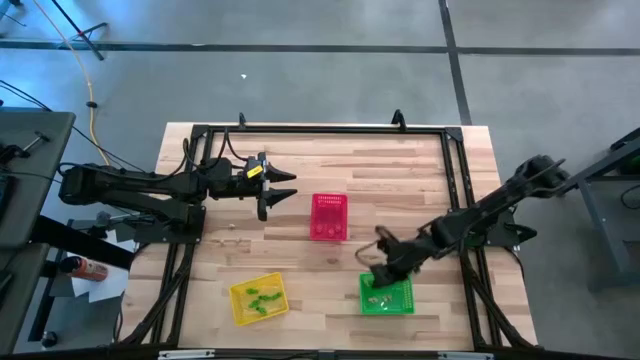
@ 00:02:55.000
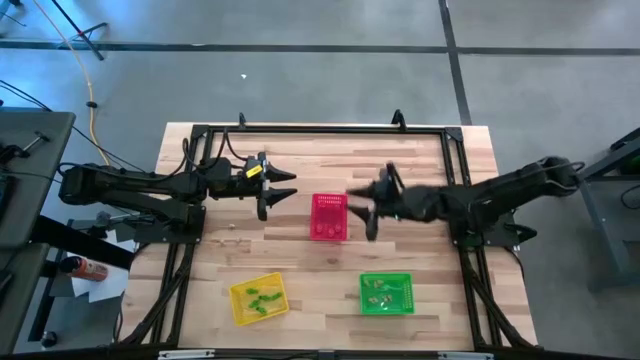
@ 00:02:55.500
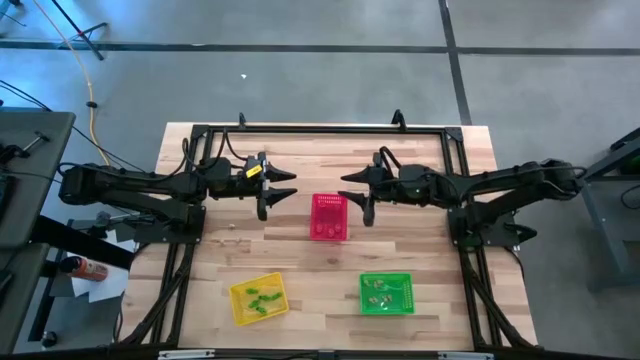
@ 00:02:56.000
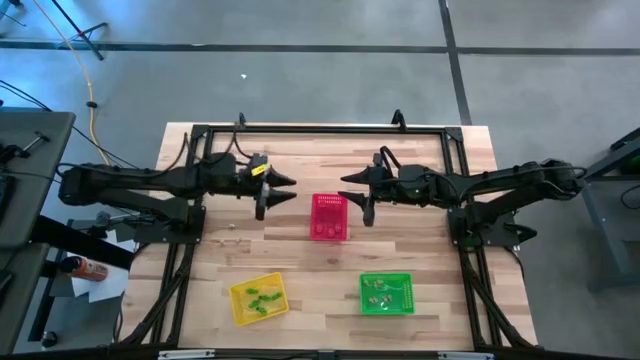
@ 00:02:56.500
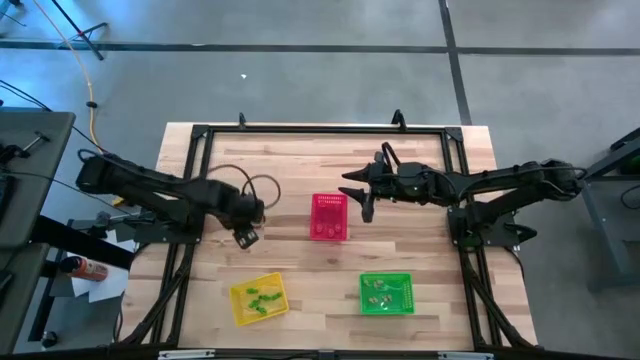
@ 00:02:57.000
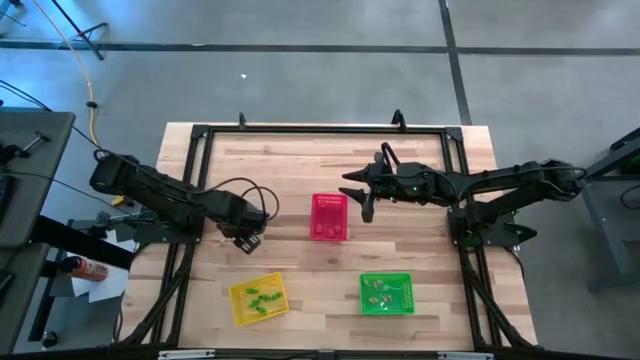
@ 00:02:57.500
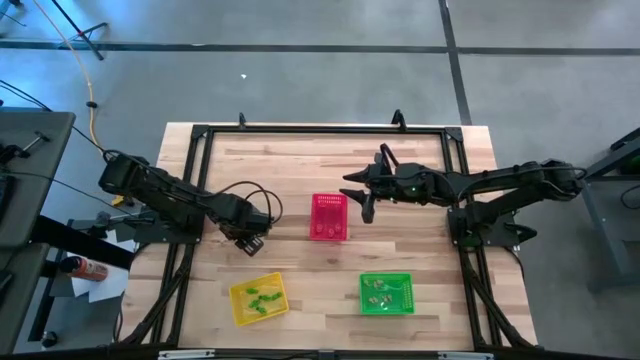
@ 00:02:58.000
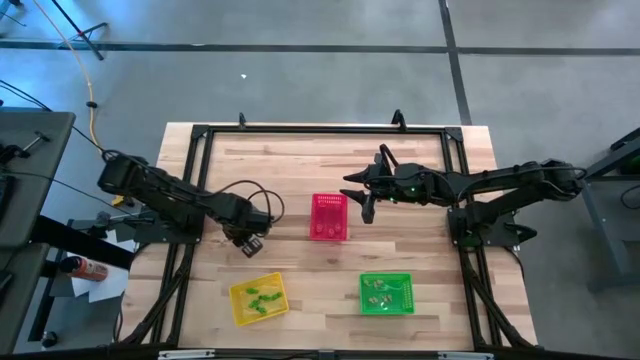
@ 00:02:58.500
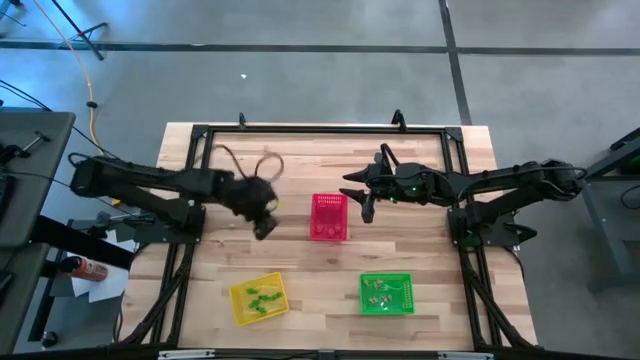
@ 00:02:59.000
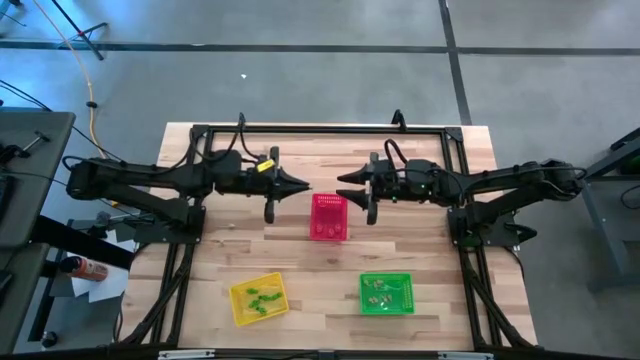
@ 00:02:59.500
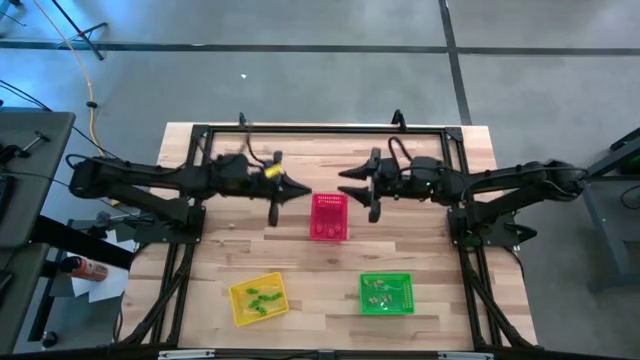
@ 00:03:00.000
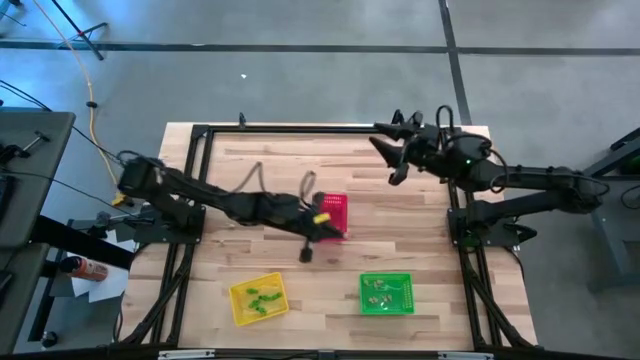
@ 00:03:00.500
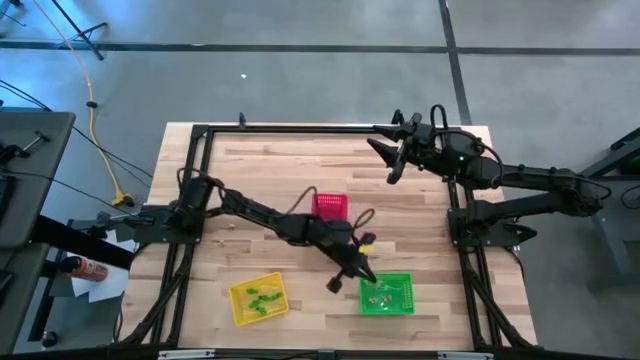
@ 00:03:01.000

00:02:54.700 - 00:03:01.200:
Task: Sort Halloween decoration
Put the bottom right white skull toy into the green bin

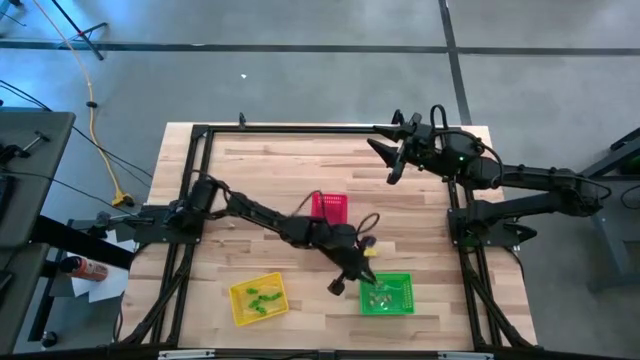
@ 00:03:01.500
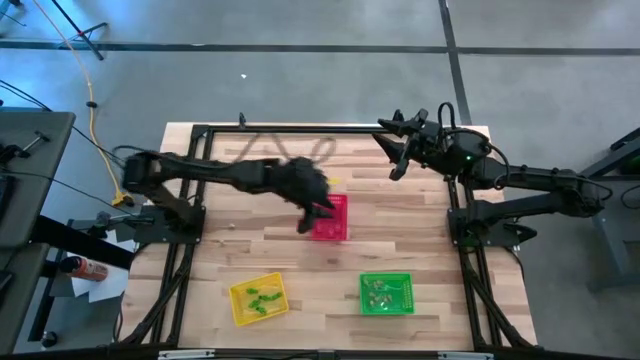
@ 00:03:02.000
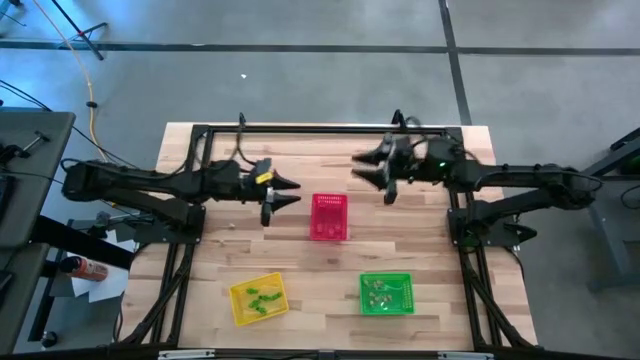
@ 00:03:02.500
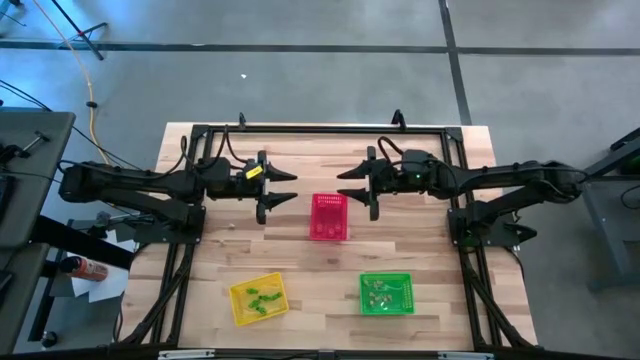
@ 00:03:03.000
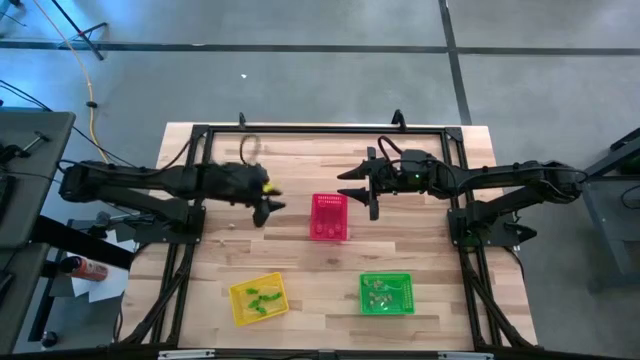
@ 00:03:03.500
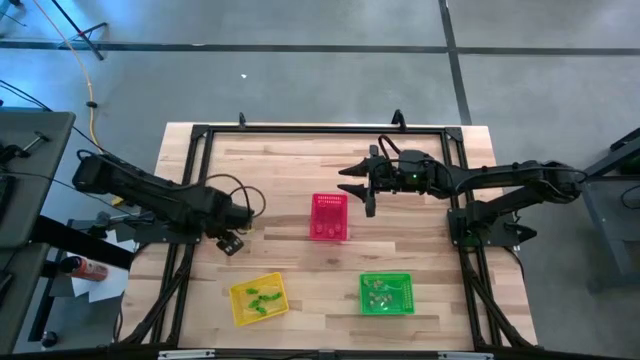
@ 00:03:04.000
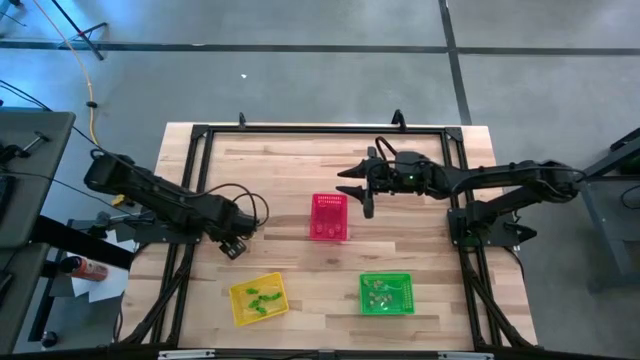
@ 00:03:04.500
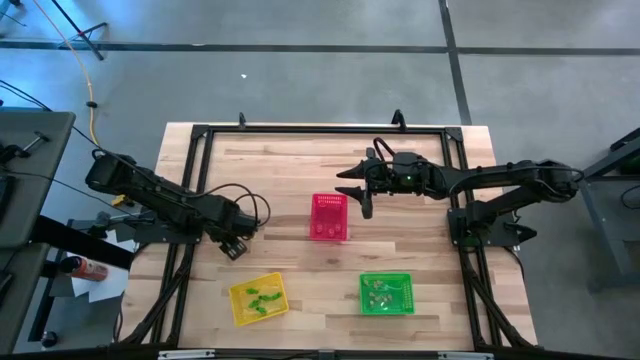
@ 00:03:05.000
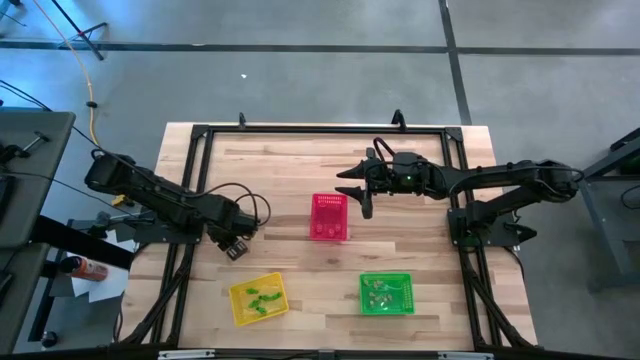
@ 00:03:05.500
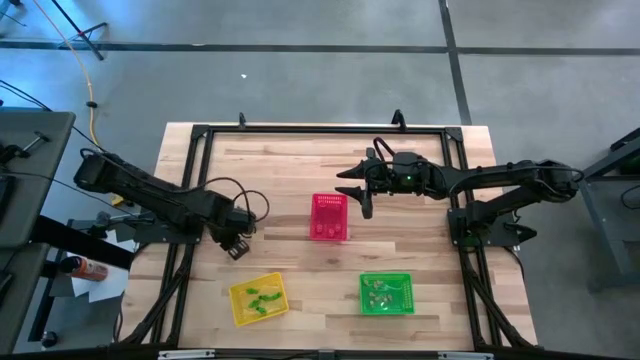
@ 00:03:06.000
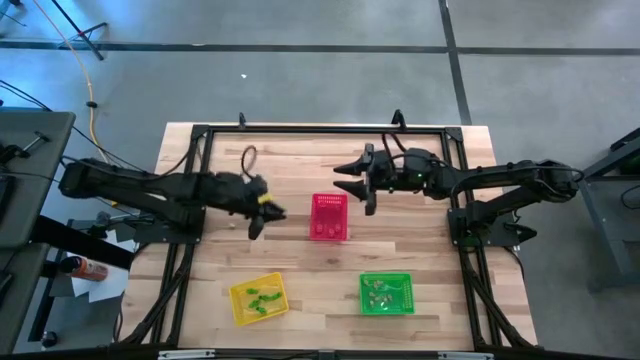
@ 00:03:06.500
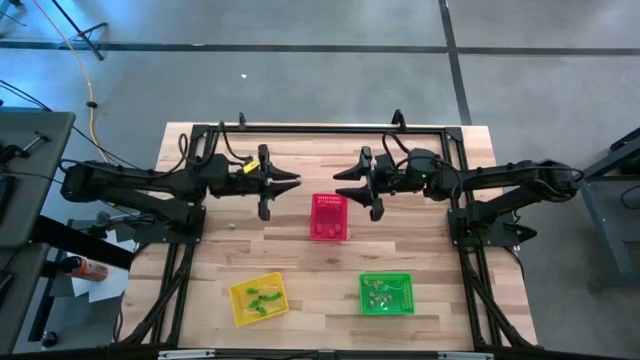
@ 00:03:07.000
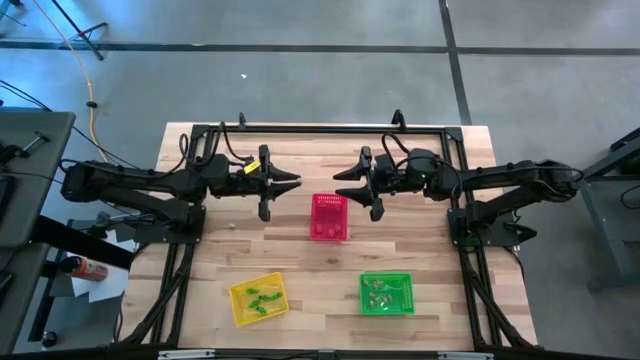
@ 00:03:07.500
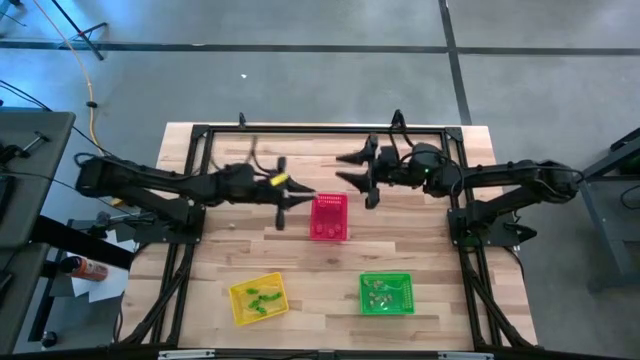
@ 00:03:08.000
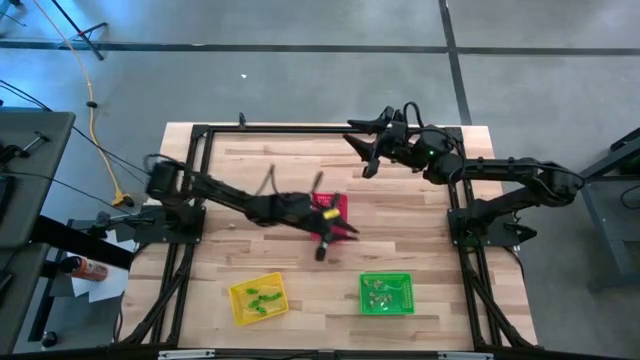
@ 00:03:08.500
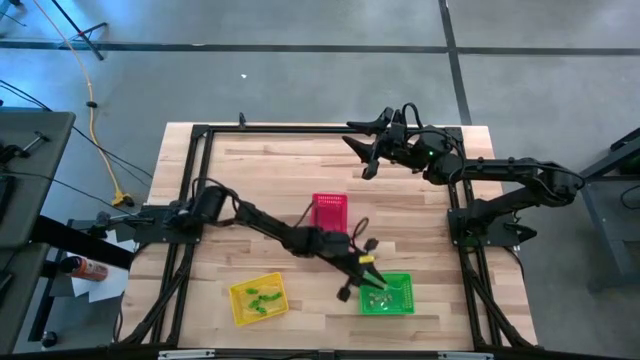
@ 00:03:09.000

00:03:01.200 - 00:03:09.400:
Put the bottom white skull toy into the green bin

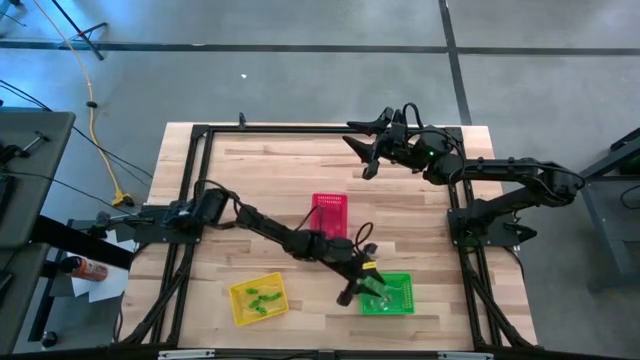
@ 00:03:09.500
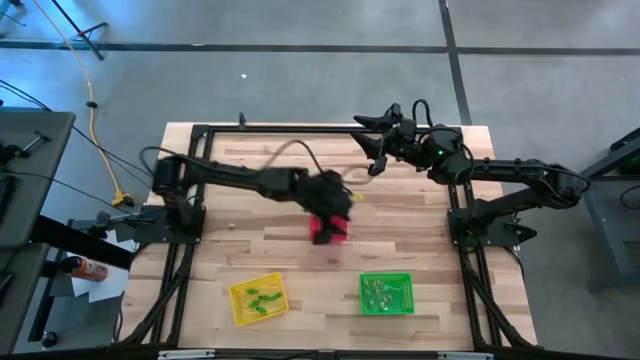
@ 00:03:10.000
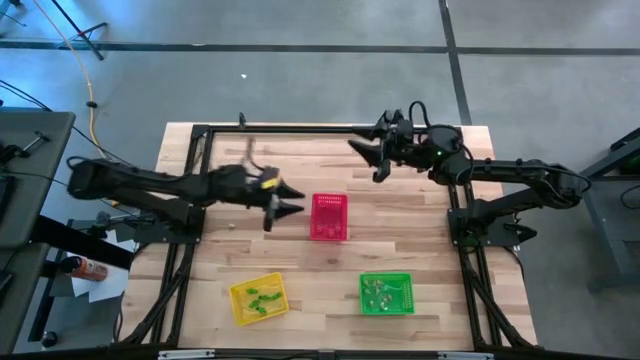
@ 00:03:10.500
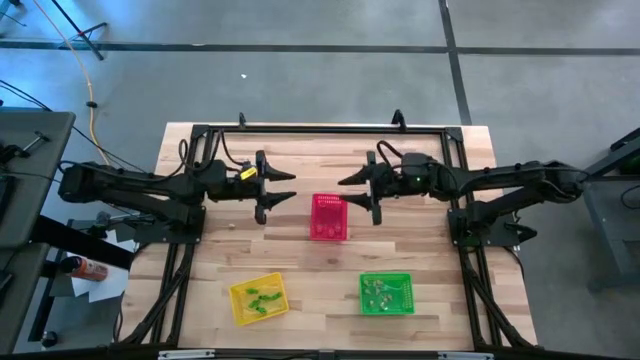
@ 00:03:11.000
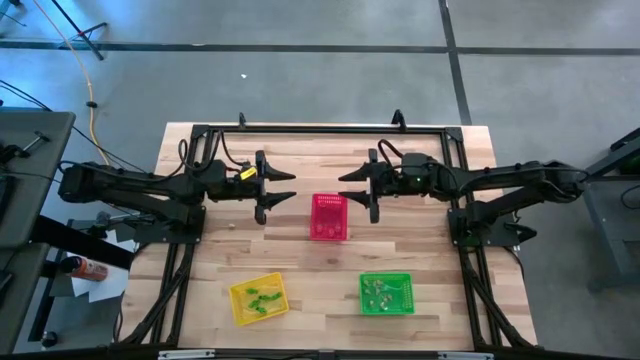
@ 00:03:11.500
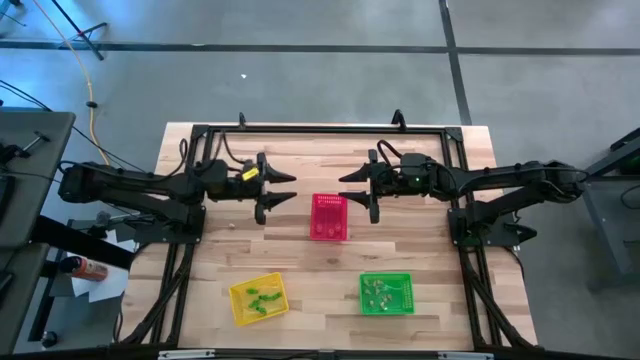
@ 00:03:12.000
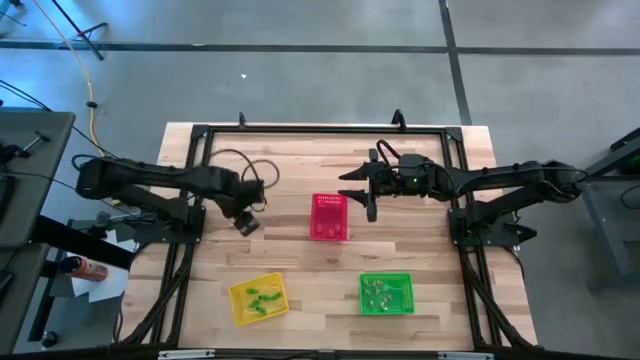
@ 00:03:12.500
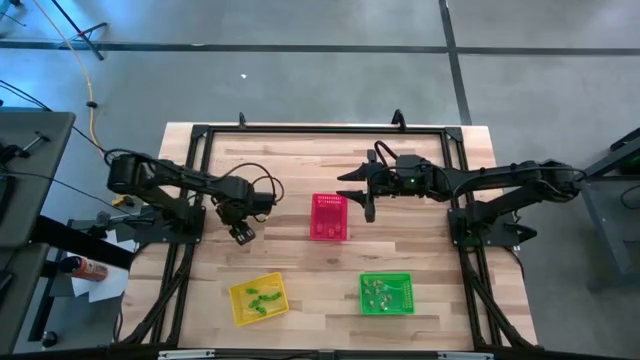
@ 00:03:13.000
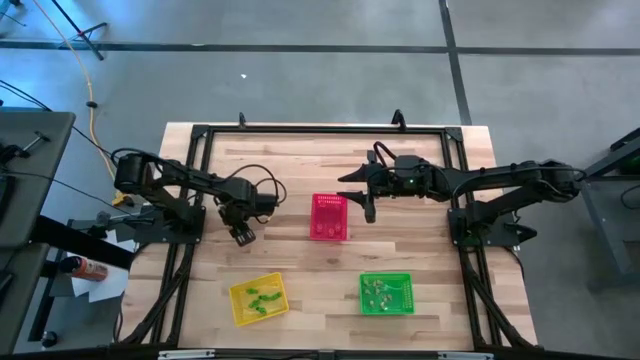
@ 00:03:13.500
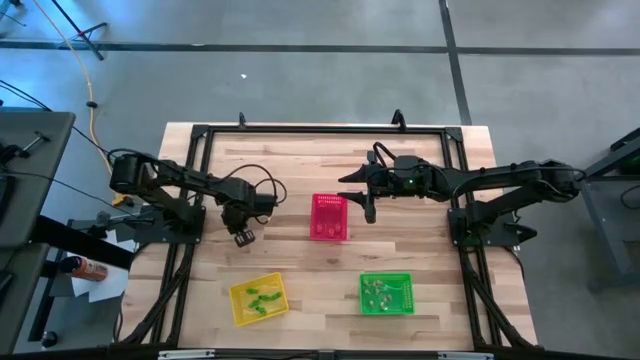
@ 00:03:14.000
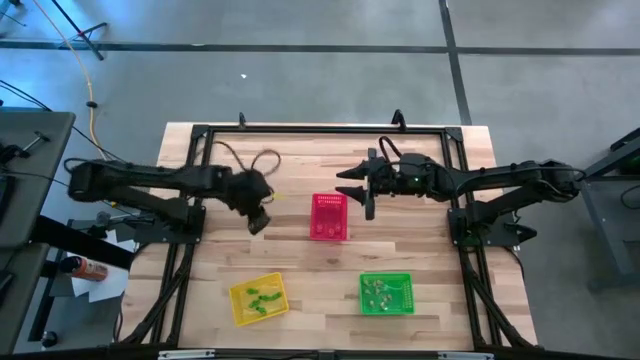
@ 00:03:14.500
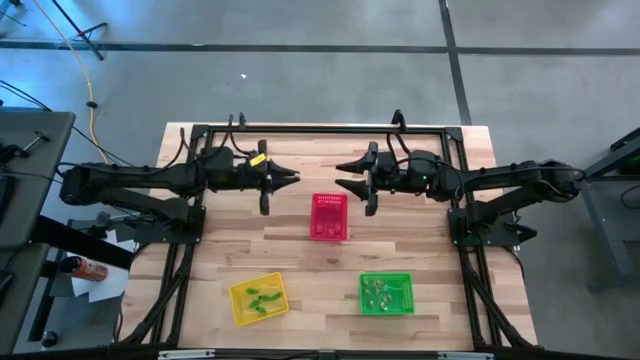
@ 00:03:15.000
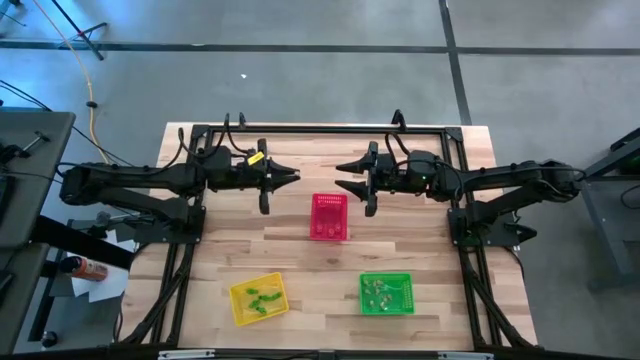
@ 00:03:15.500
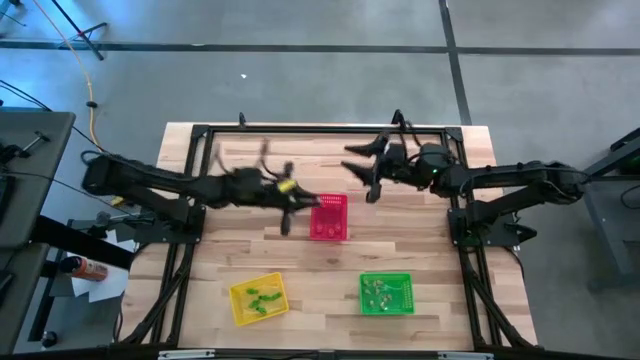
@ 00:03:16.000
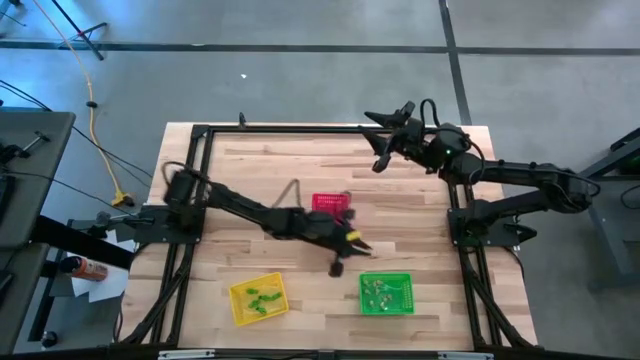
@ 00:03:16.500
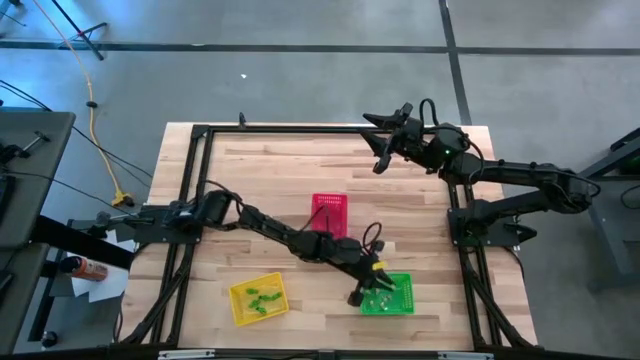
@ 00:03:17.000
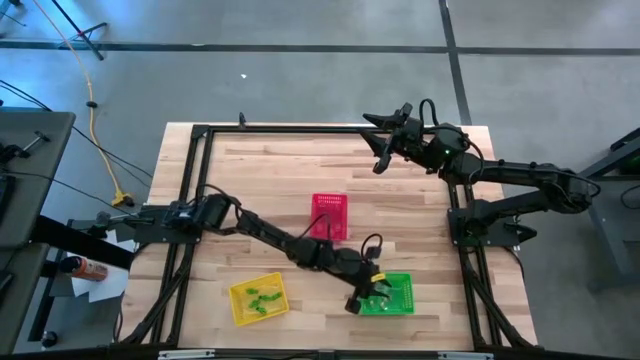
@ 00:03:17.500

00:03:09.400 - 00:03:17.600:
Put the white skull toy into the green bin
